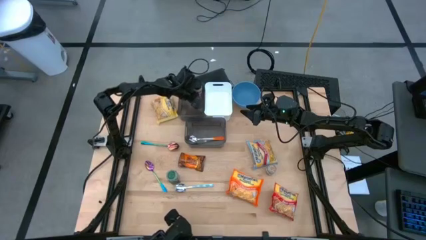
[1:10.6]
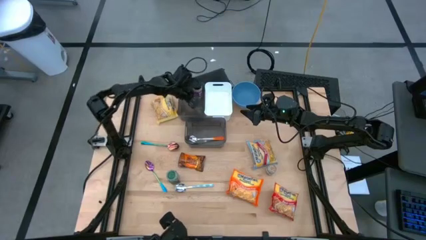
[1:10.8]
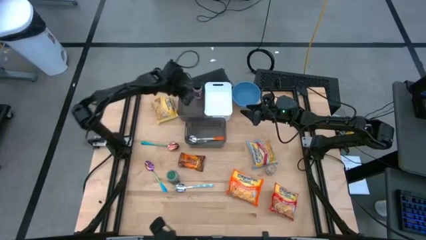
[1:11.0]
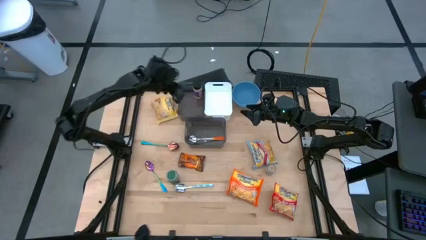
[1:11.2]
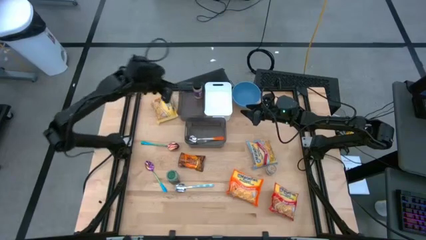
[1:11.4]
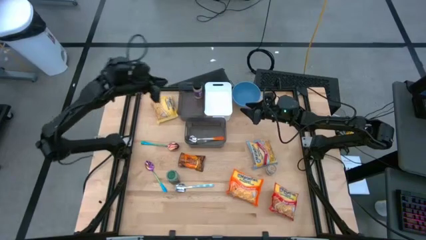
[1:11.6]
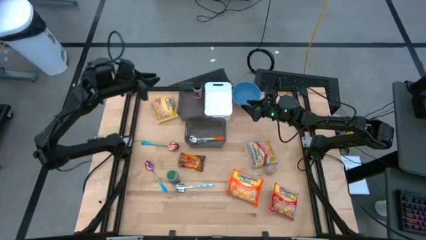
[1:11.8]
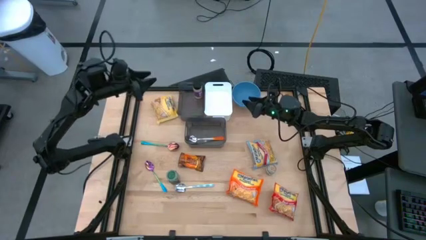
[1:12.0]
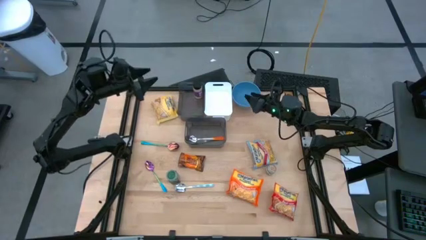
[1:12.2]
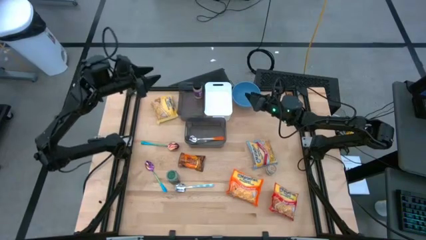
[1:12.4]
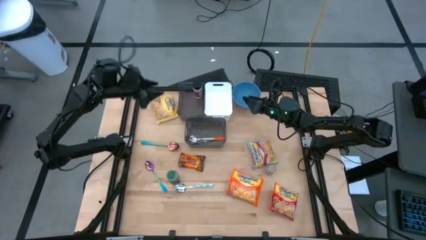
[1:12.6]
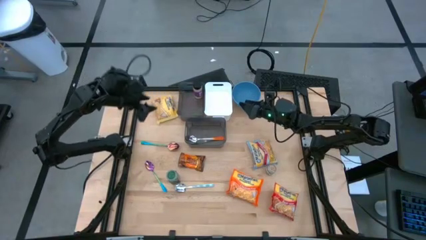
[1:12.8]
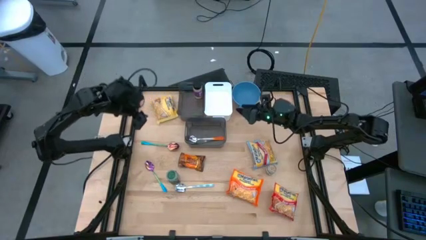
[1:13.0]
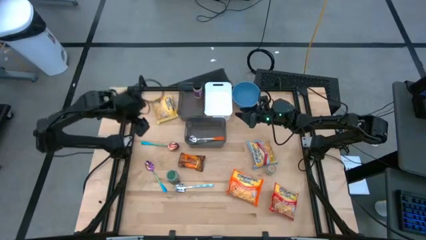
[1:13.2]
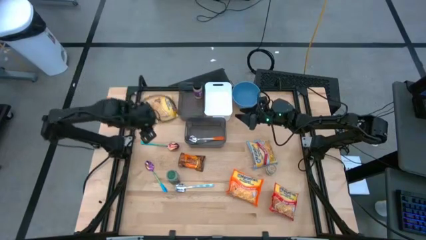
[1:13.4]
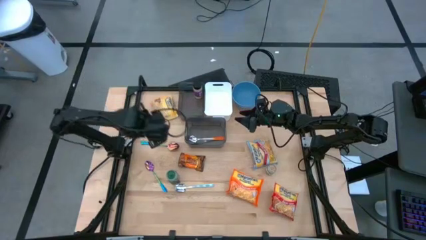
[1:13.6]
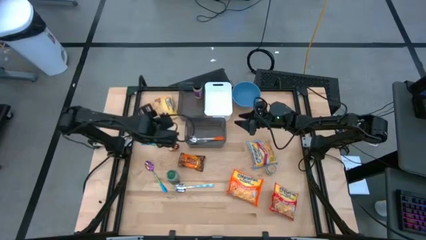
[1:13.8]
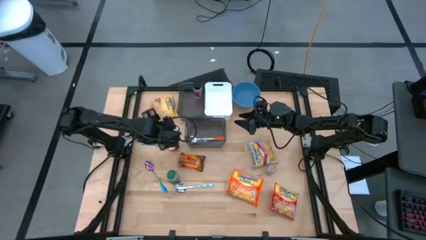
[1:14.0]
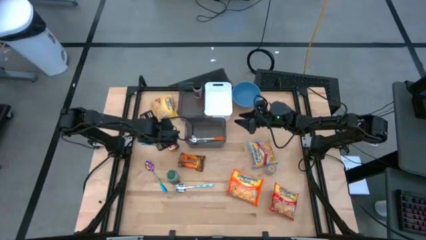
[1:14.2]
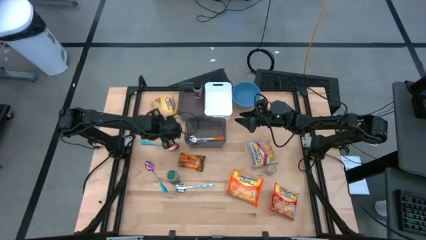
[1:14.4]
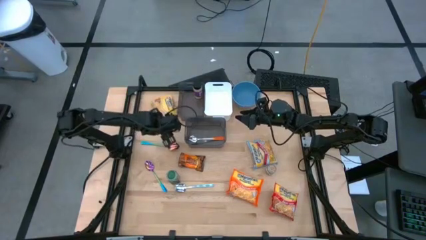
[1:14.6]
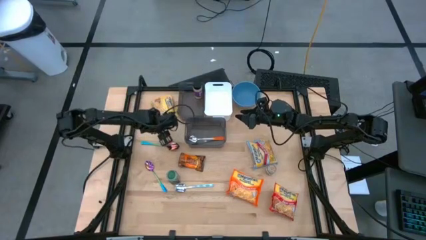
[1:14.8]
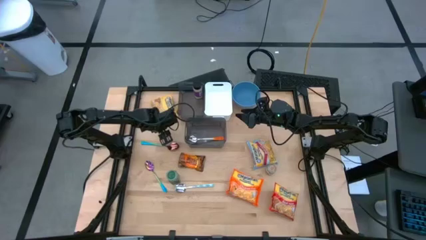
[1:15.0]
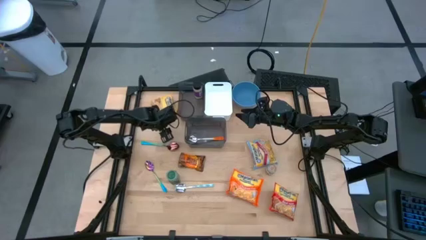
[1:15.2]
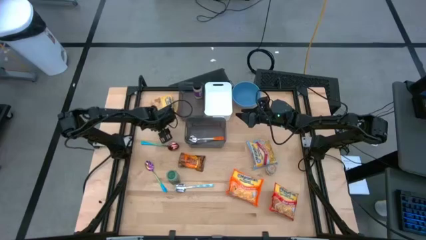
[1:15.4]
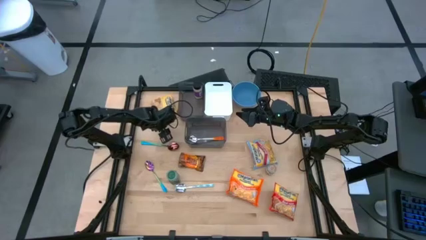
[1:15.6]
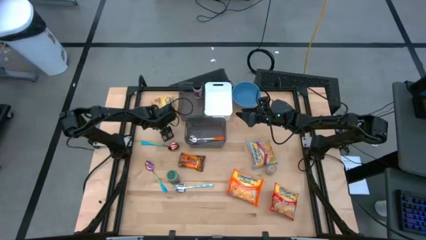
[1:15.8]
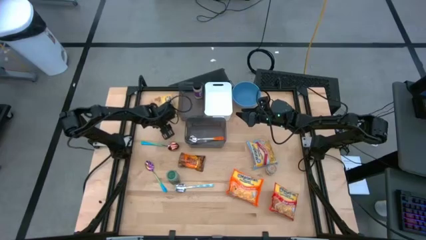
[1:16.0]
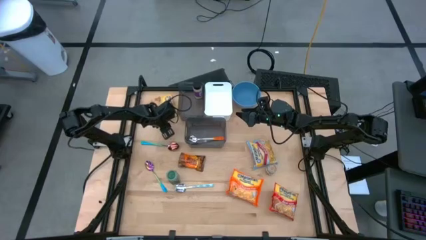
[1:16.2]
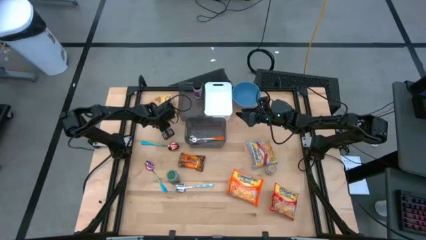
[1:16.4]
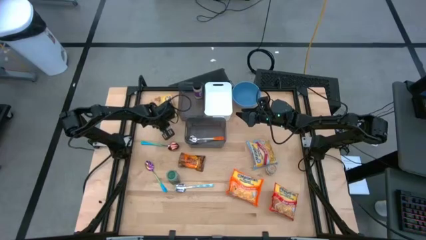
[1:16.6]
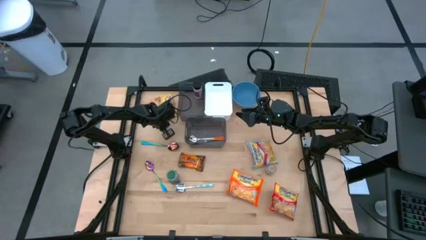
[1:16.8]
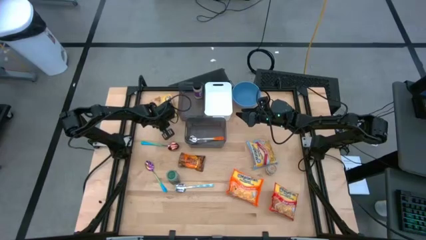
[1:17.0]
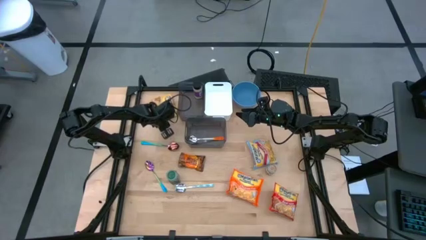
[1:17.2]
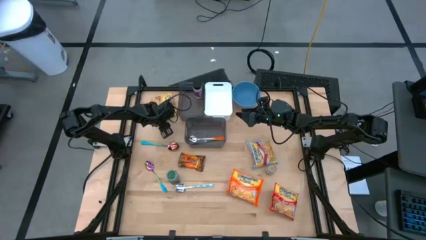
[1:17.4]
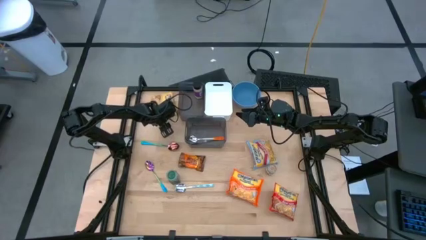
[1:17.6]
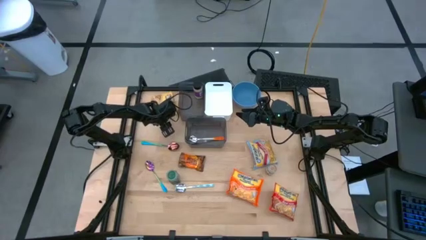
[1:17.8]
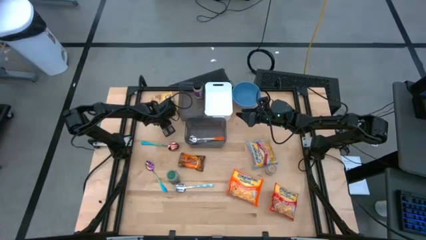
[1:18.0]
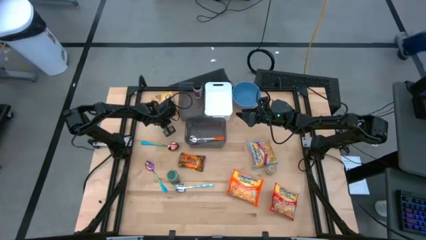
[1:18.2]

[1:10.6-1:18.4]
Task: Pick & Place Food Item
Put the yellow noodle pack into the white bin

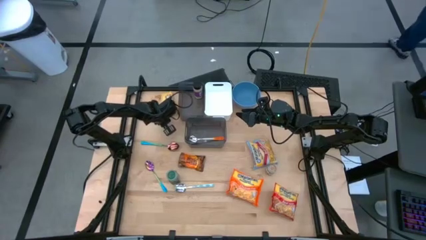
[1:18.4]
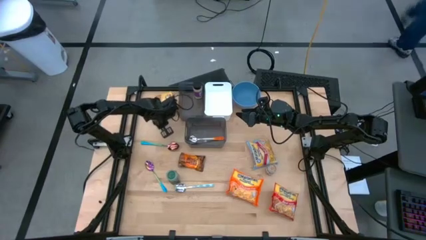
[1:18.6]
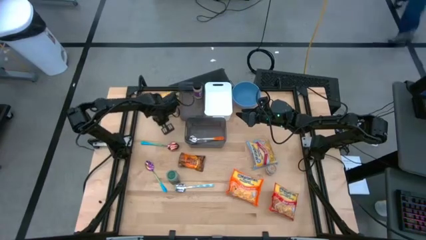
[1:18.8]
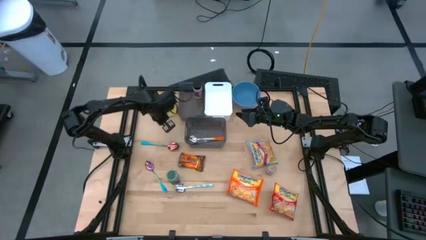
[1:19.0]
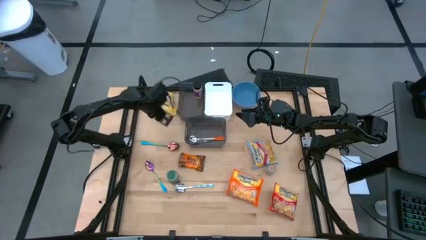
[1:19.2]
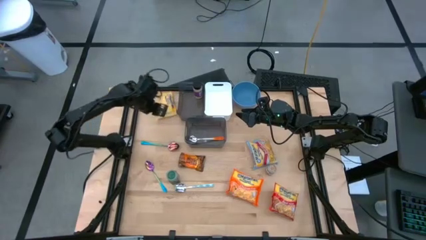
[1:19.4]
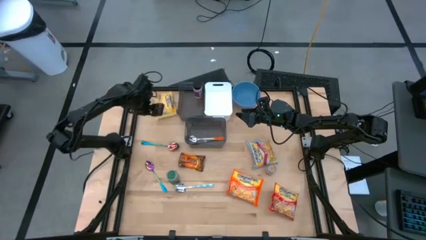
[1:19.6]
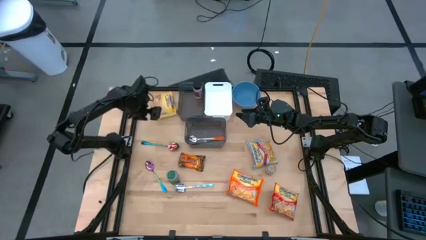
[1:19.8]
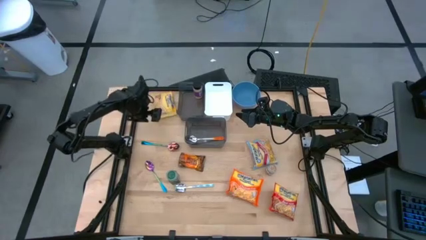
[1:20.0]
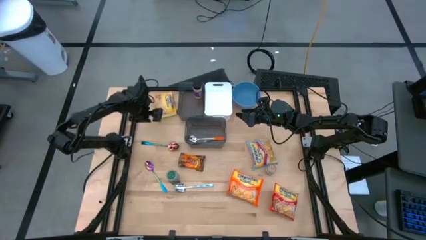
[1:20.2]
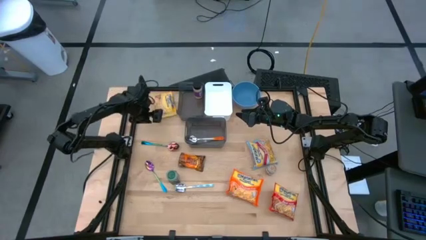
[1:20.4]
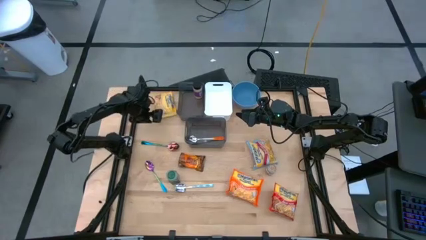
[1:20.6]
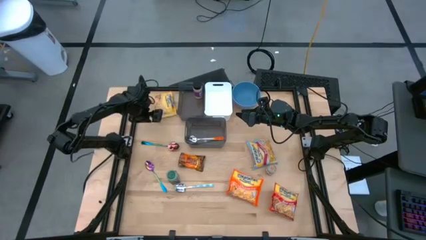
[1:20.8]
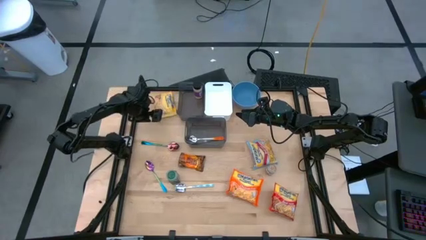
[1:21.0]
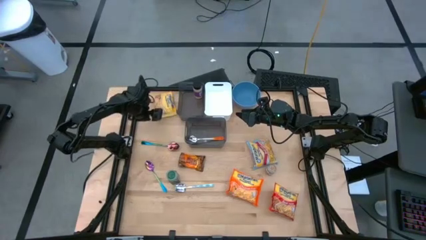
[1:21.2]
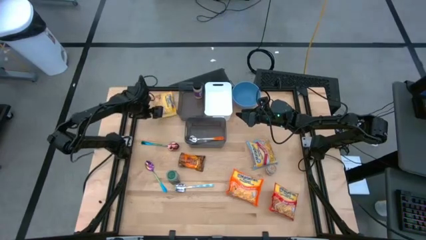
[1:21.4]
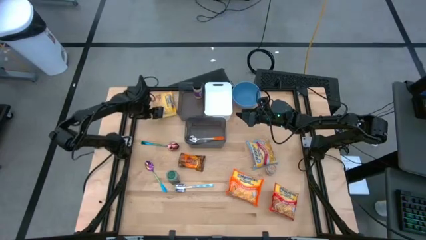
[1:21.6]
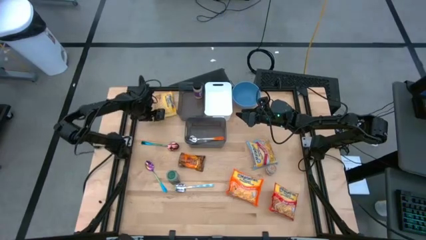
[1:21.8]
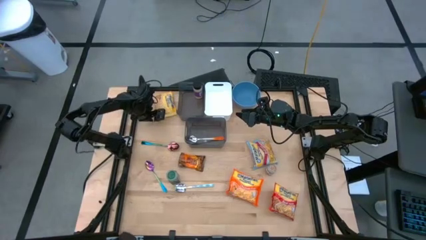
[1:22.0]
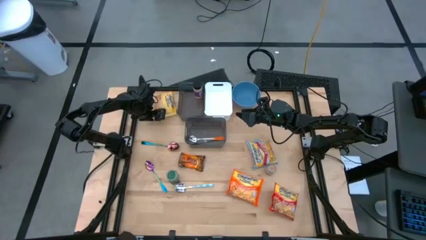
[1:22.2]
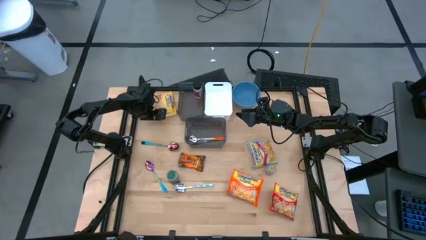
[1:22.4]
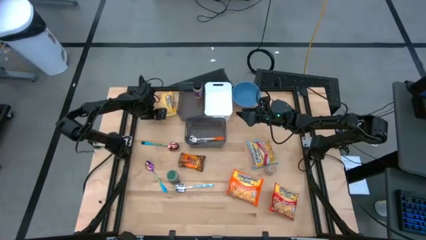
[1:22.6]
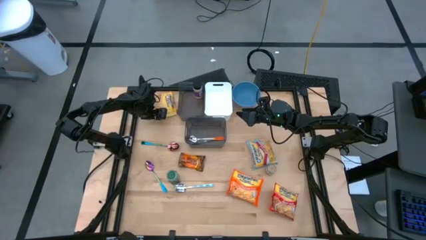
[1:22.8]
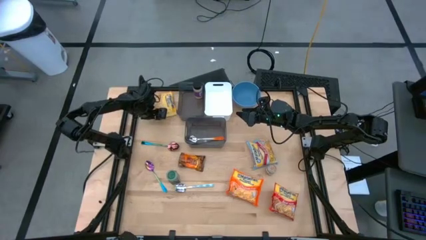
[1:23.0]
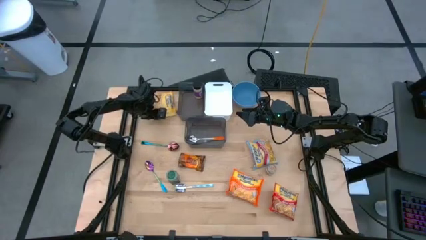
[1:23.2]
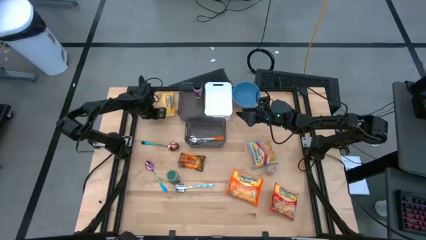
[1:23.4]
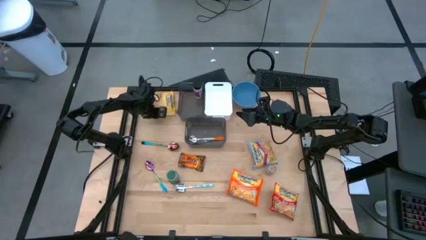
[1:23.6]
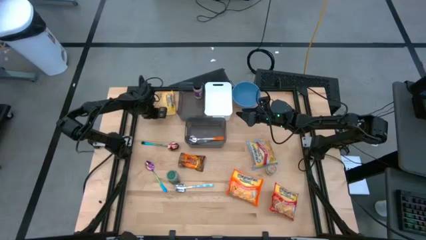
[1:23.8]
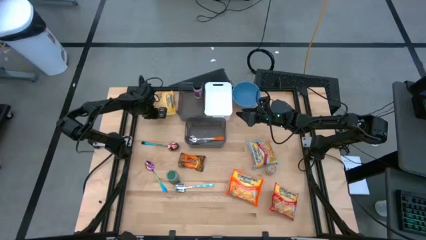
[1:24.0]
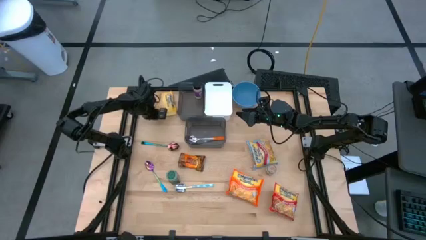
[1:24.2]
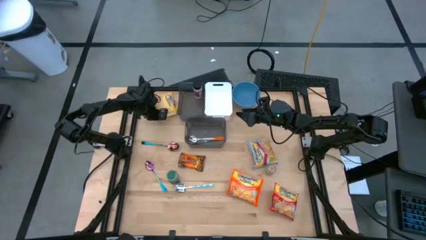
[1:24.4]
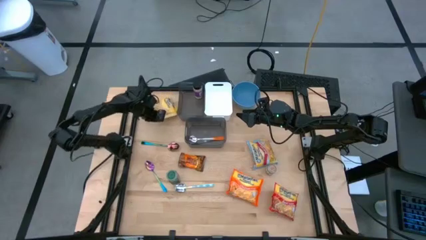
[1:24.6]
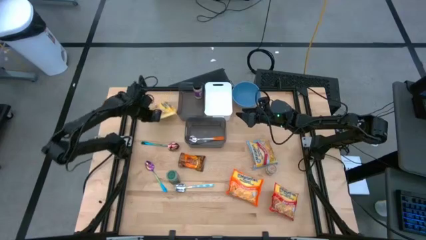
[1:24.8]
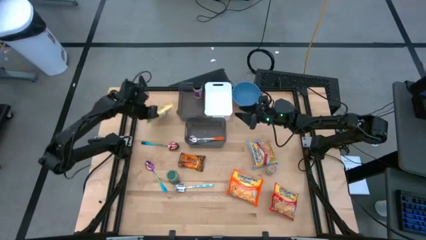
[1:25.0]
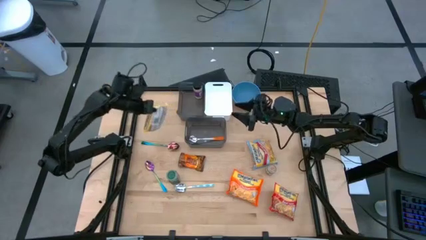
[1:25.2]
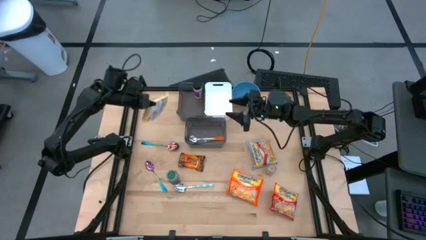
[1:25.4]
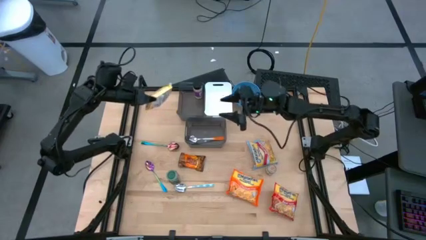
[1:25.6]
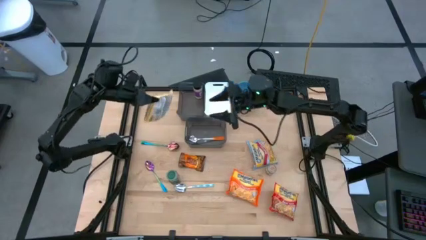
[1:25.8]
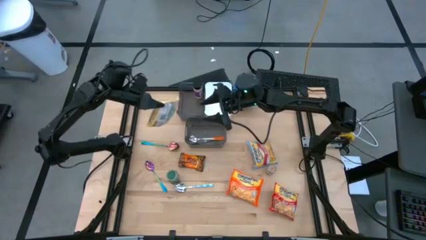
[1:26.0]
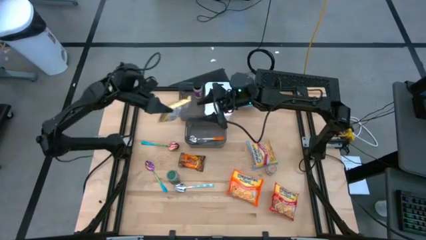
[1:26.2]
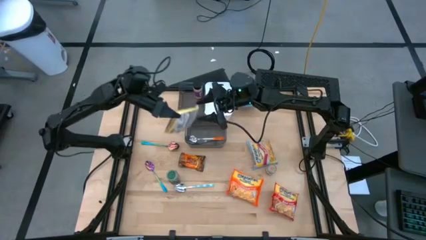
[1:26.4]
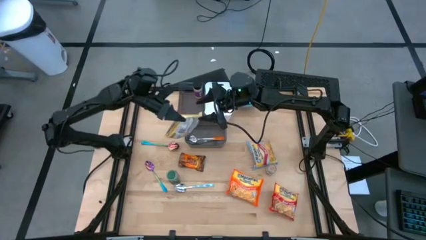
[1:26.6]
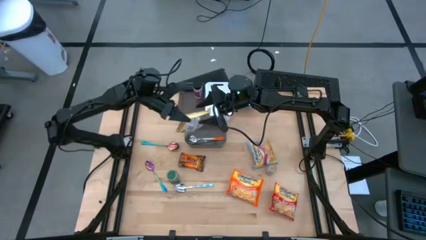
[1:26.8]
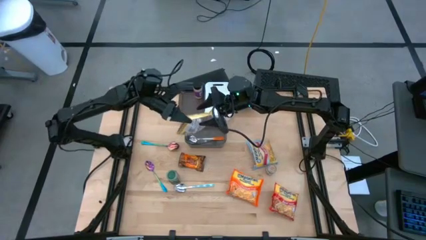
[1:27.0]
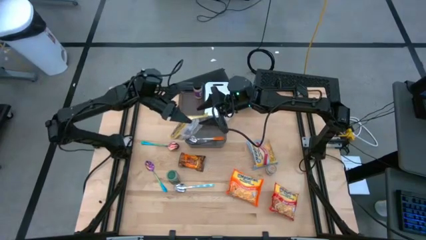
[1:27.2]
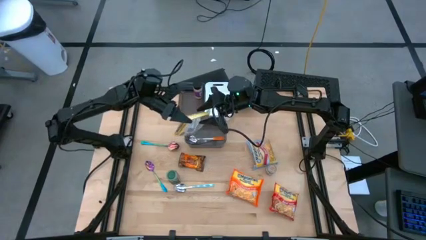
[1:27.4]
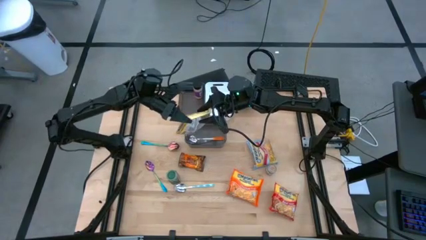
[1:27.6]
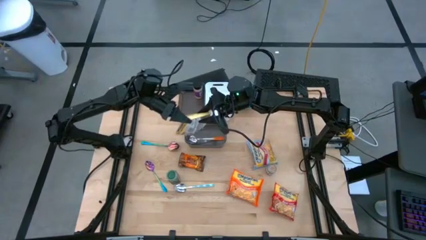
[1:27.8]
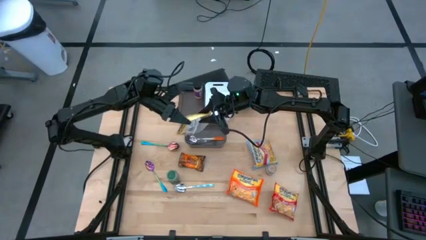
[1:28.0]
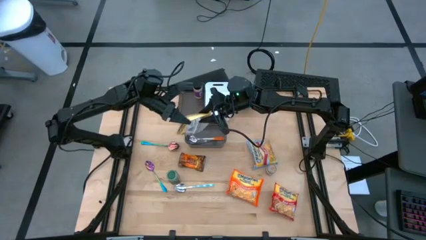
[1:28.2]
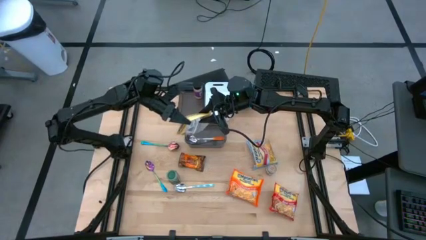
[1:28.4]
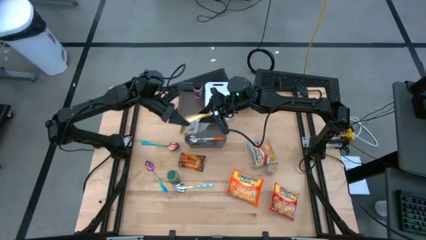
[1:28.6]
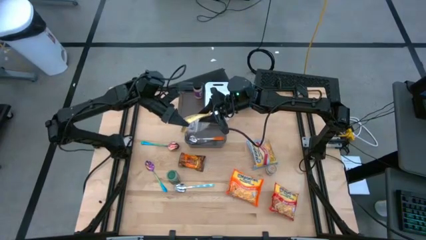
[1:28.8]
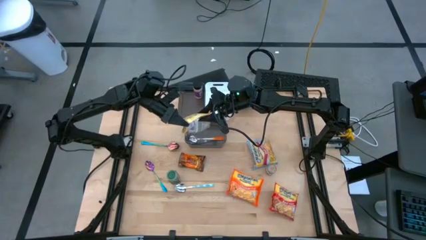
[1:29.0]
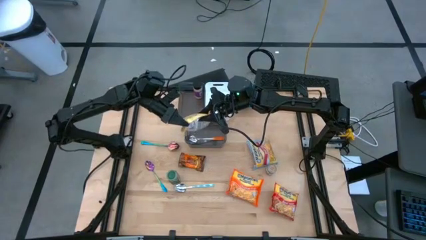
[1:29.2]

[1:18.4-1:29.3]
Put the yellow noodle pack into the white bin
